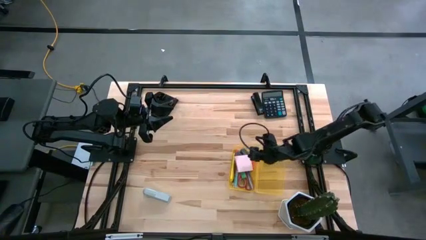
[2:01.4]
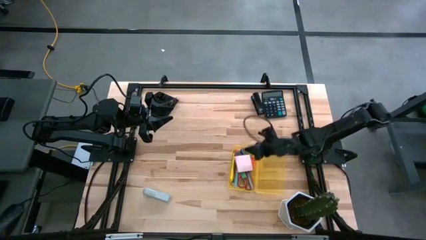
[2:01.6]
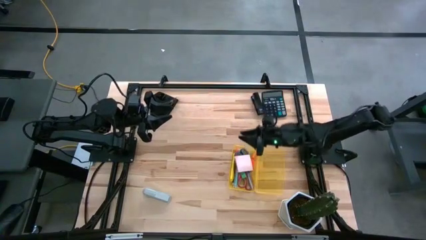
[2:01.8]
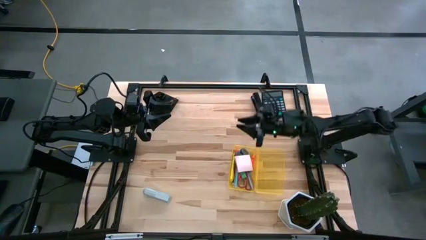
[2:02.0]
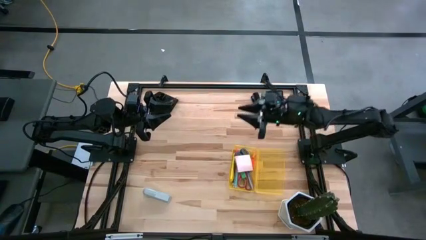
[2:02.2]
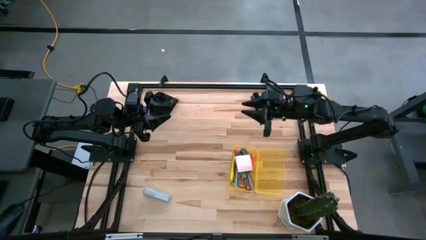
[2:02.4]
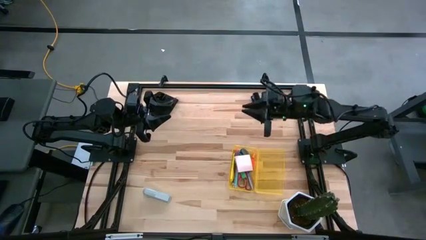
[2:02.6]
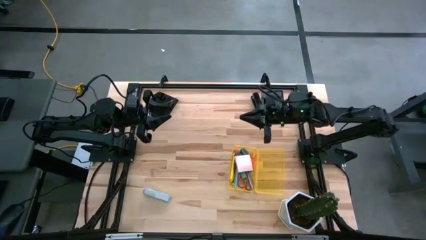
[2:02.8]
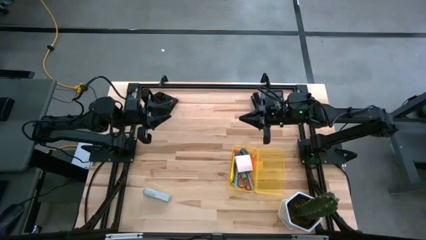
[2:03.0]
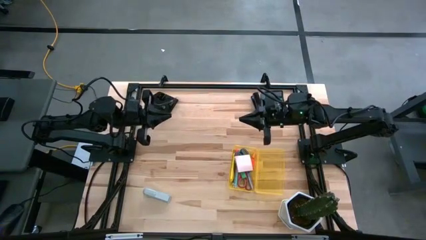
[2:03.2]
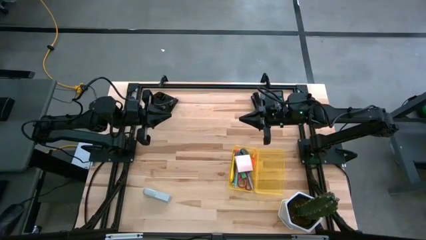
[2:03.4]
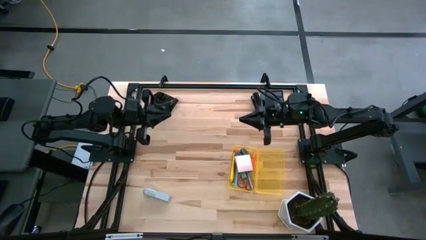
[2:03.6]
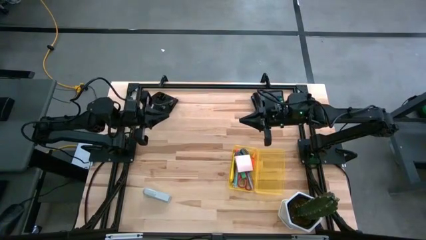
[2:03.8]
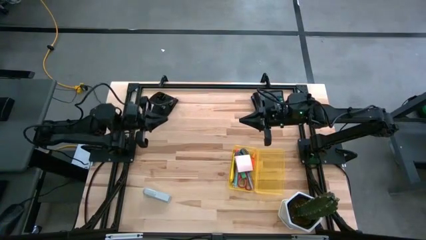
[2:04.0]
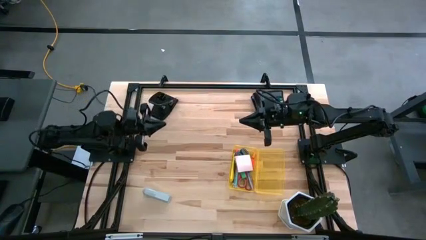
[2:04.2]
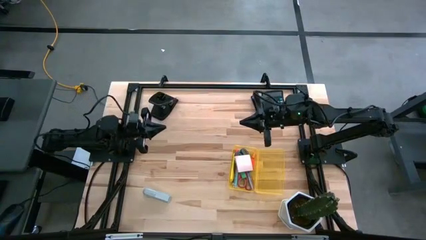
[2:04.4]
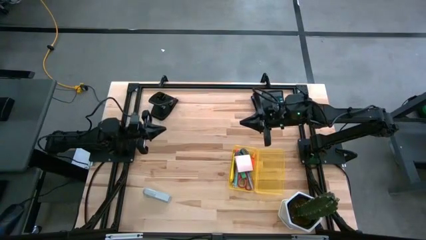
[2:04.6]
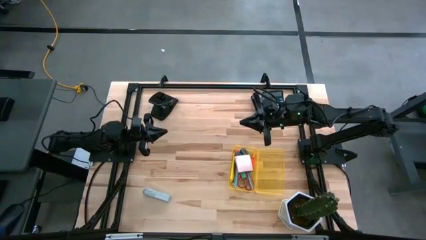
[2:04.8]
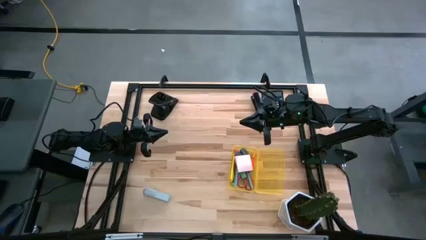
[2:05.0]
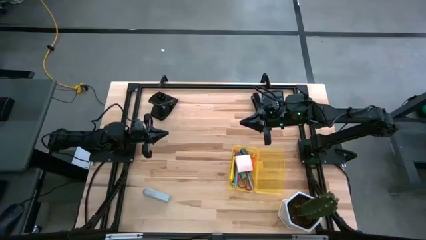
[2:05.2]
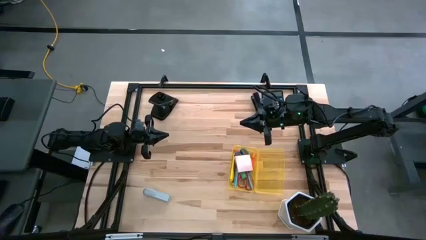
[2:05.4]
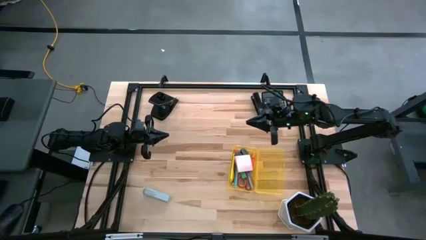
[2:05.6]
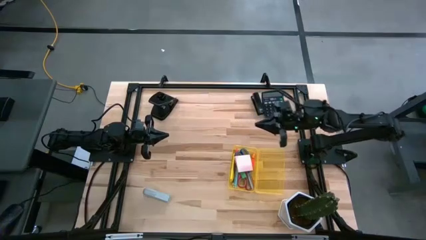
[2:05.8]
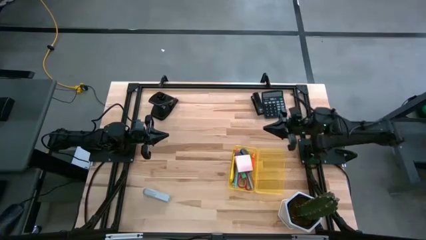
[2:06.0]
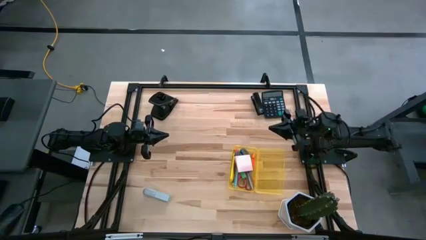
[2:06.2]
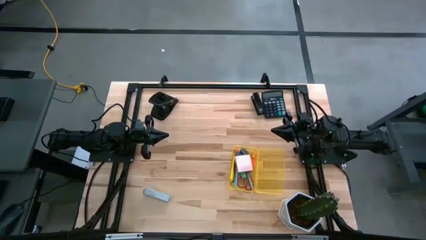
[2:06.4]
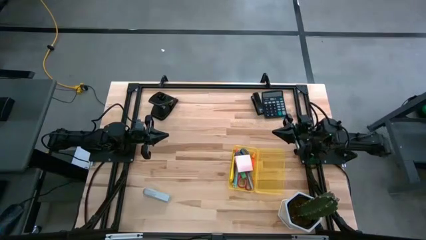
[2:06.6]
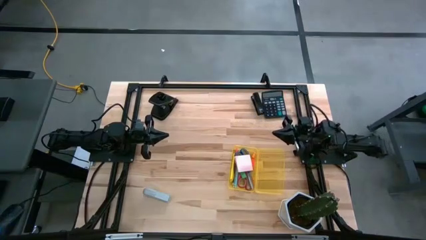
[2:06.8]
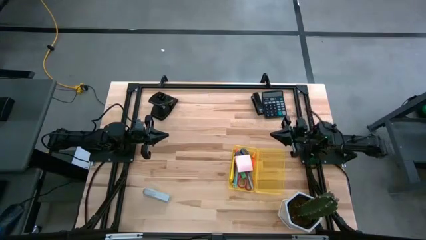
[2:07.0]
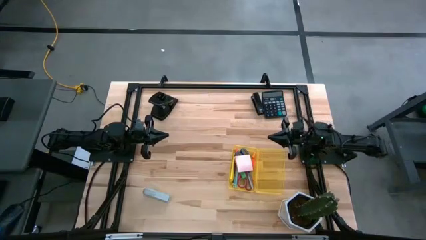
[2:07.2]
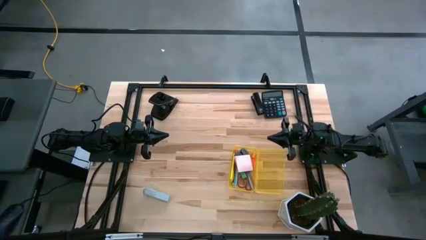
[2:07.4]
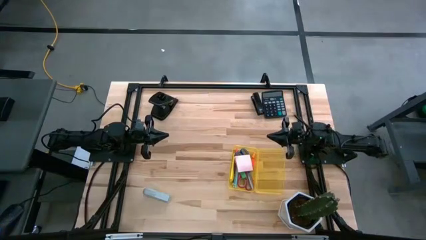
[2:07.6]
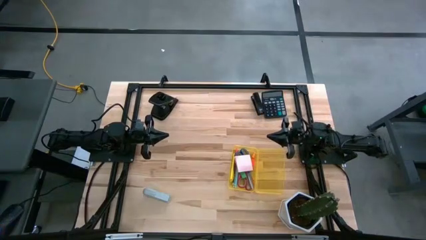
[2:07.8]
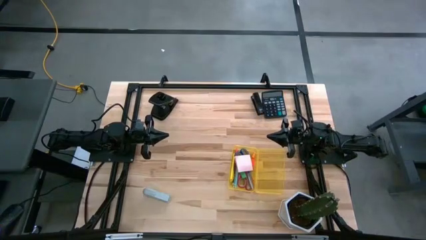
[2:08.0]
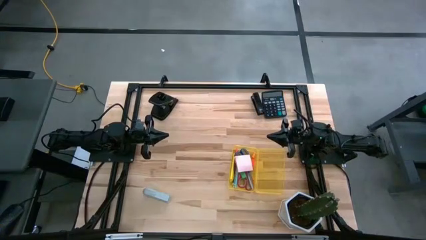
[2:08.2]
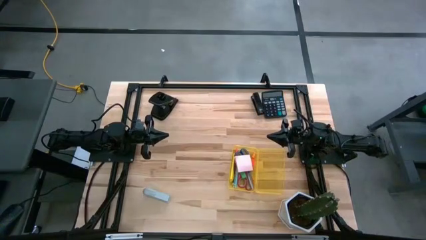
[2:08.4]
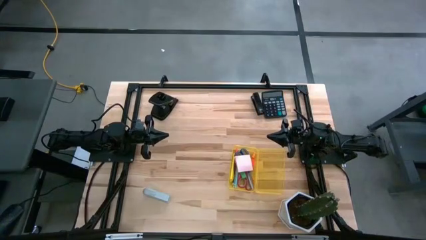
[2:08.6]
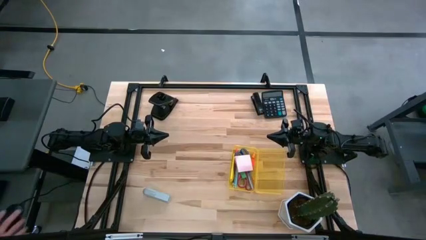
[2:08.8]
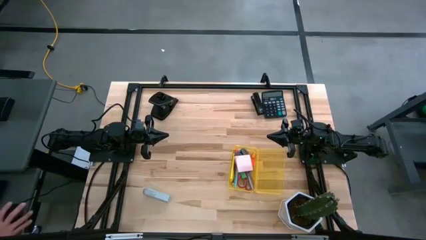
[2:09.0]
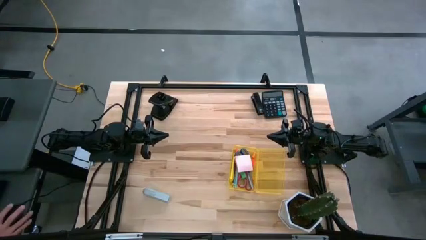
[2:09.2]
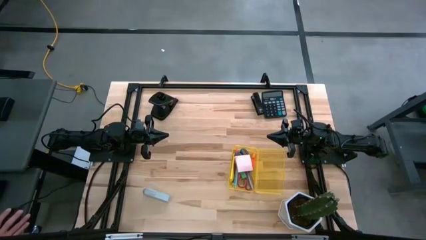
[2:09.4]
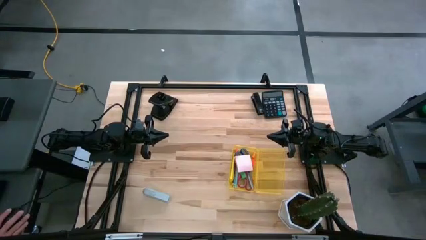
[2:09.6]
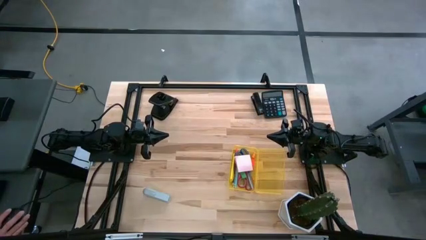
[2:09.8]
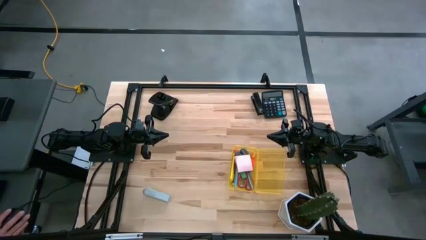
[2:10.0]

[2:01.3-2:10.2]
Task: Pack school essentials
Return to Home Position

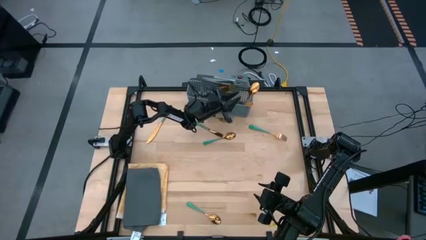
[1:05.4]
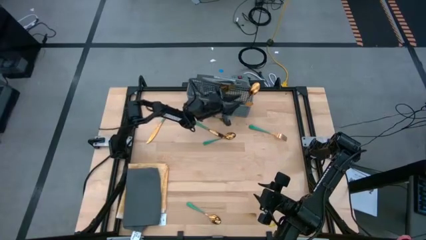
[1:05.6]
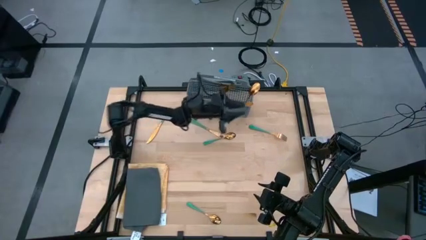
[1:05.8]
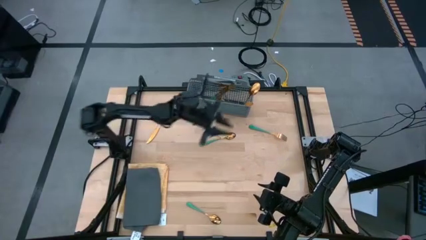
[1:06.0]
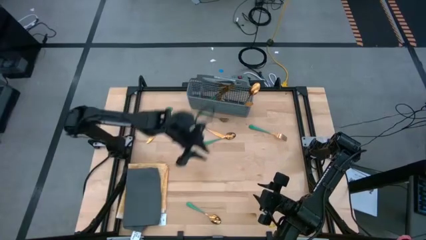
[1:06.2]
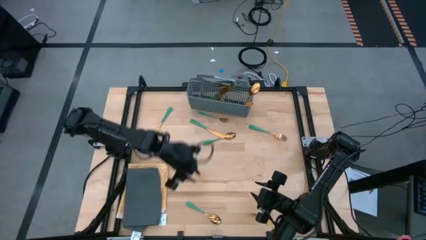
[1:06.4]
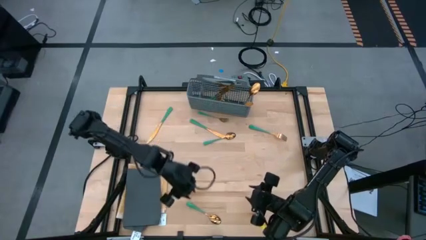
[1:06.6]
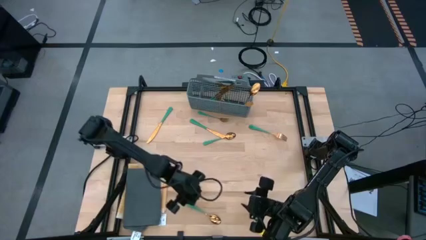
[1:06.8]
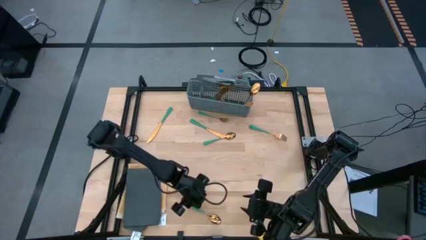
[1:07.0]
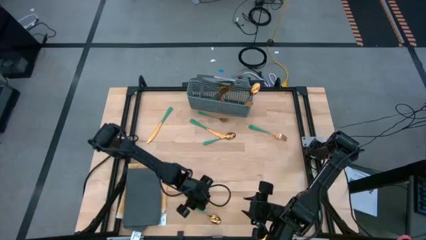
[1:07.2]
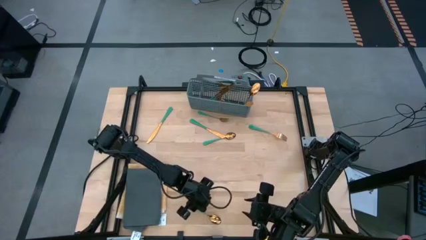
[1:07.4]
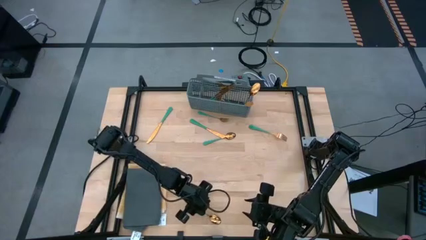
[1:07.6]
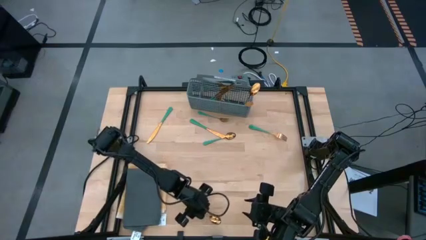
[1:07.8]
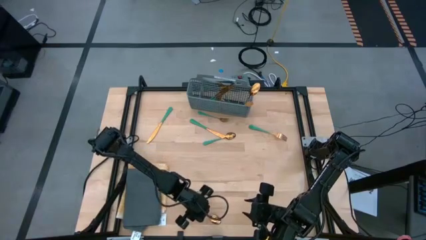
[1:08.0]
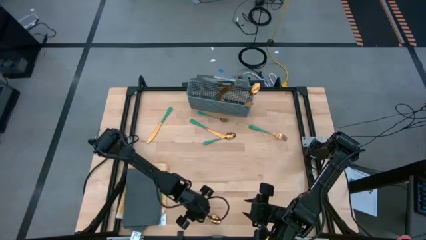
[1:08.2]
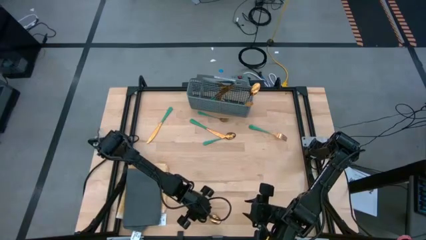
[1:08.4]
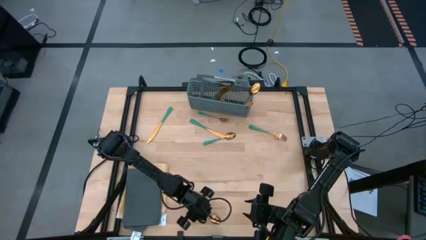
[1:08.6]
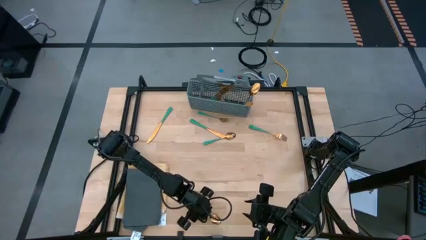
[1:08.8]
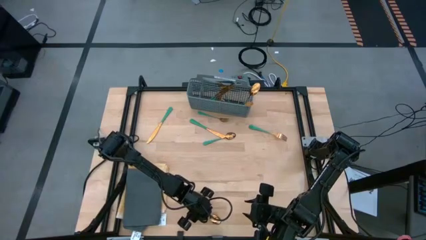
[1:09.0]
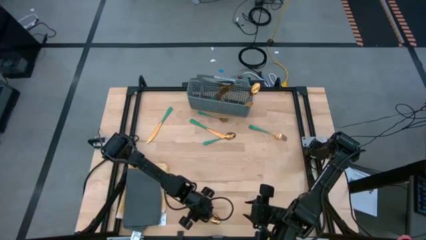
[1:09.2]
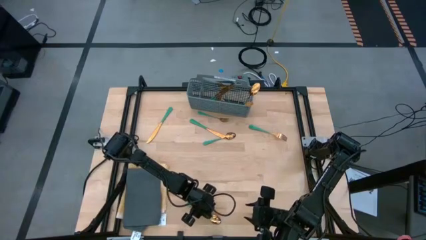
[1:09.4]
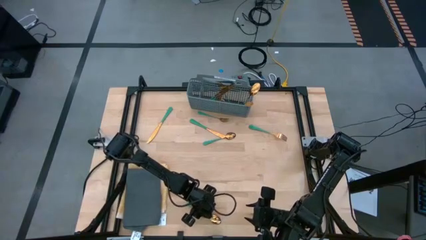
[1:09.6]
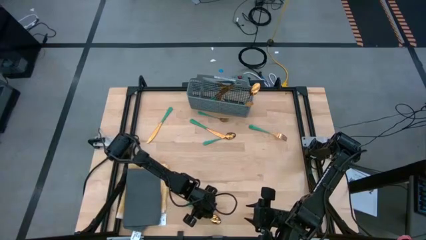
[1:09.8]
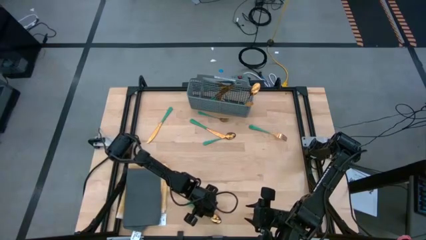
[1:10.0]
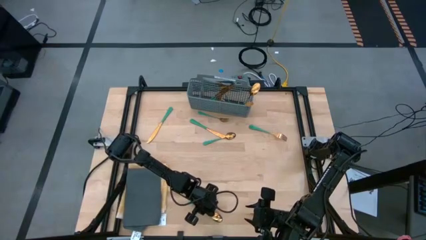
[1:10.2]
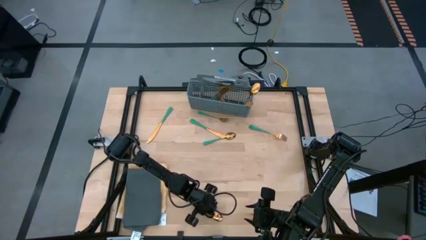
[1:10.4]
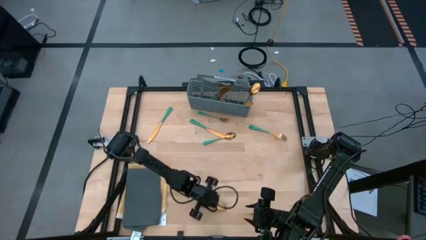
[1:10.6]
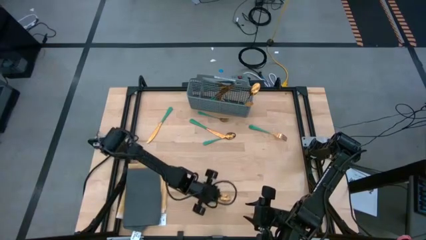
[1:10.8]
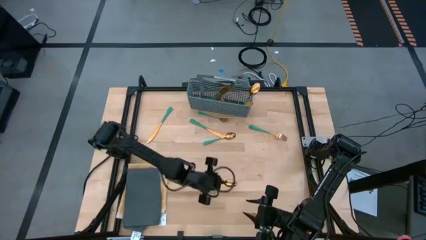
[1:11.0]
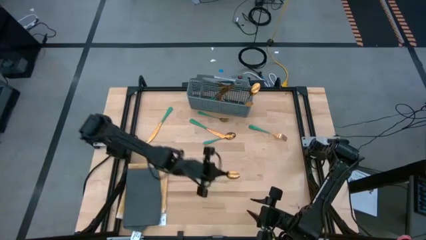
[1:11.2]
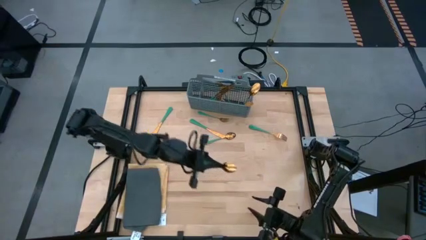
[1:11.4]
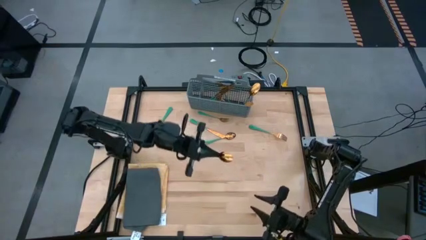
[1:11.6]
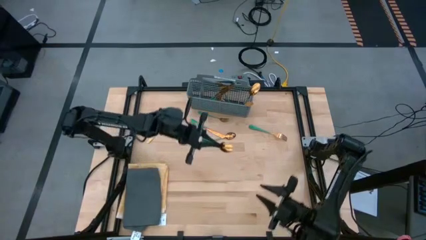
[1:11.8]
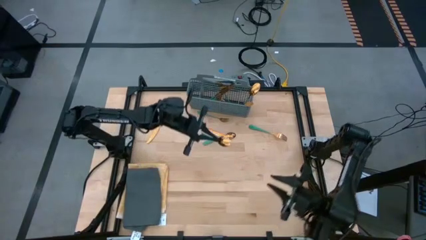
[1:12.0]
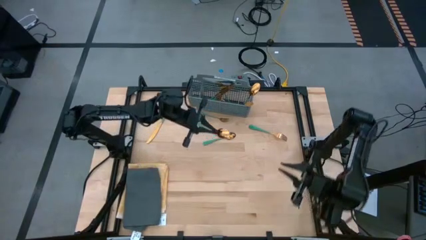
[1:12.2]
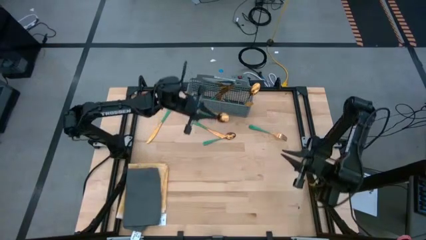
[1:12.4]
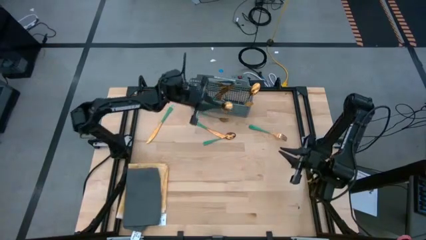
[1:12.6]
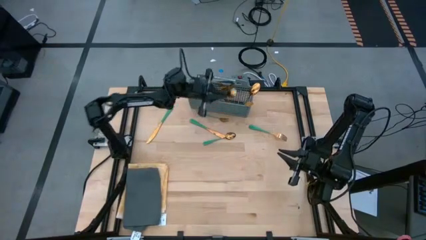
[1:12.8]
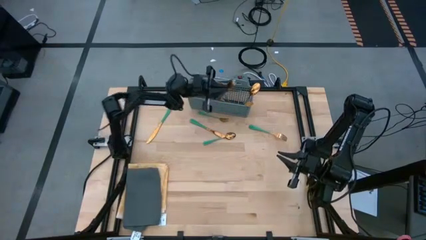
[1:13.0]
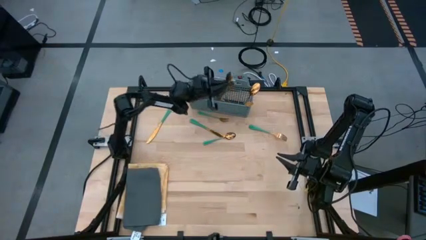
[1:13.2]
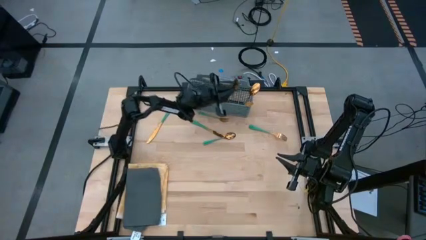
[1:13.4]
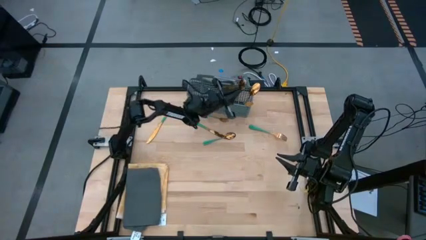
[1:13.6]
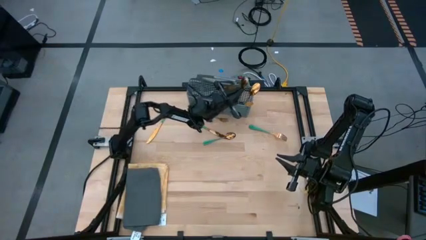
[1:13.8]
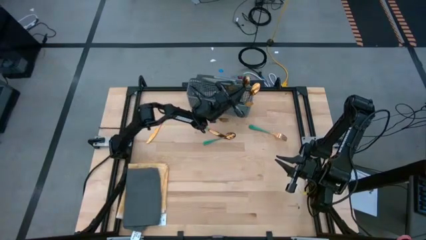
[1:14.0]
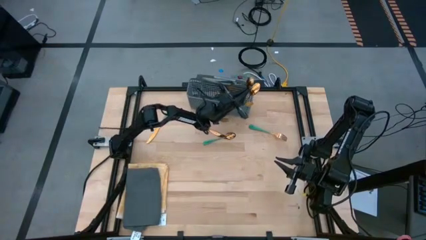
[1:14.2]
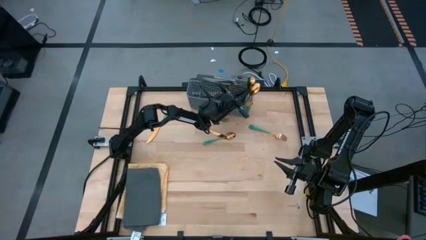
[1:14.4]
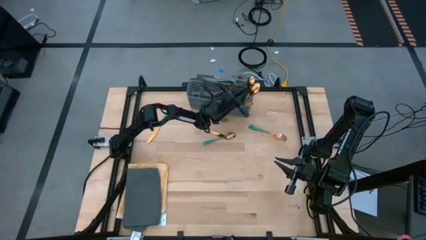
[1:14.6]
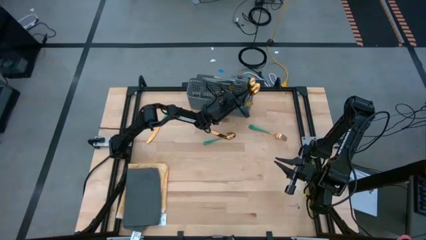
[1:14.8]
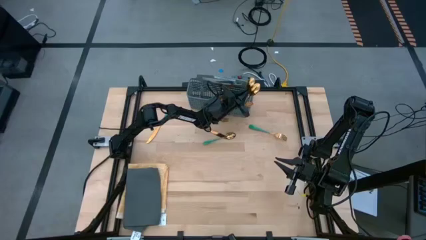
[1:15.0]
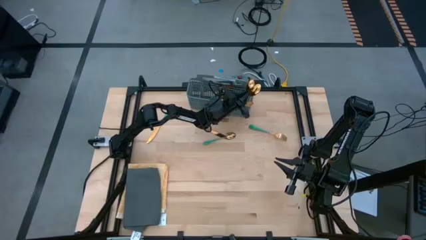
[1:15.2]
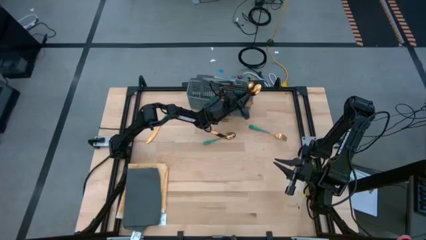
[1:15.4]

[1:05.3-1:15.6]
Task: Sort silverware
Put the green spoon into the dishwasher utensil holder
